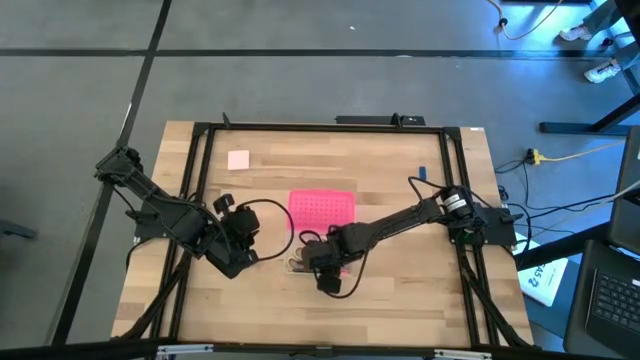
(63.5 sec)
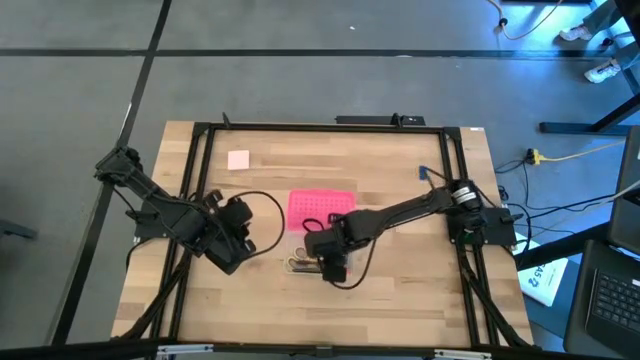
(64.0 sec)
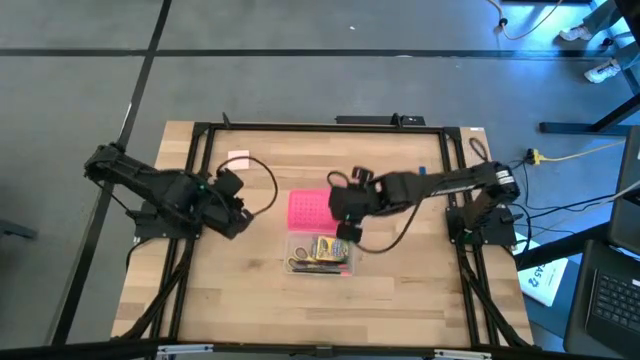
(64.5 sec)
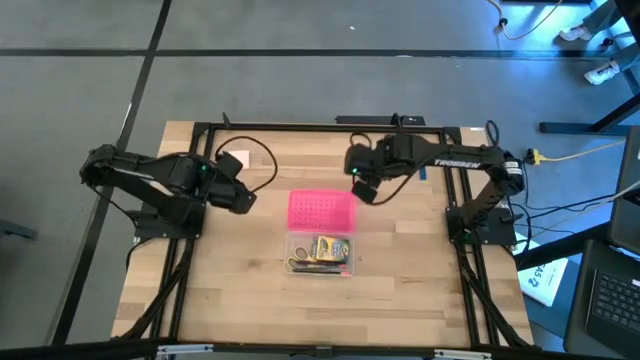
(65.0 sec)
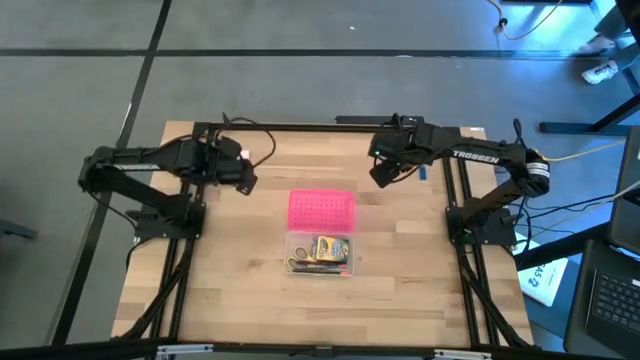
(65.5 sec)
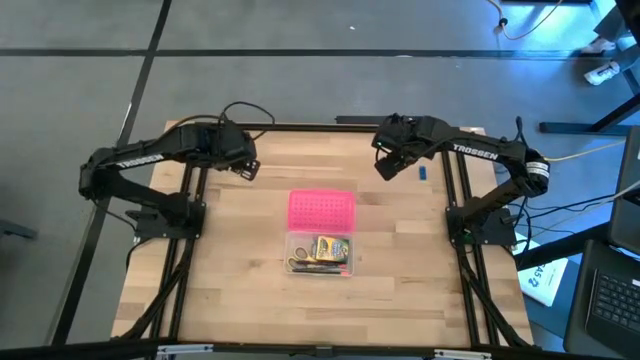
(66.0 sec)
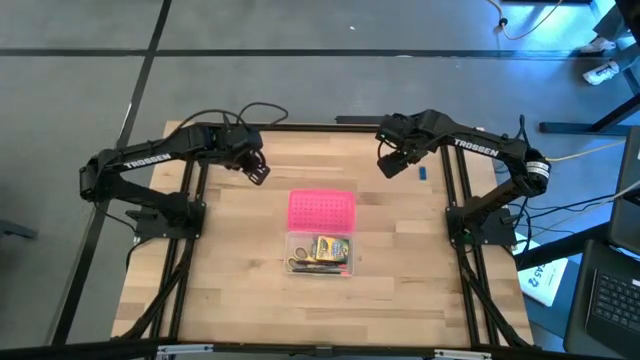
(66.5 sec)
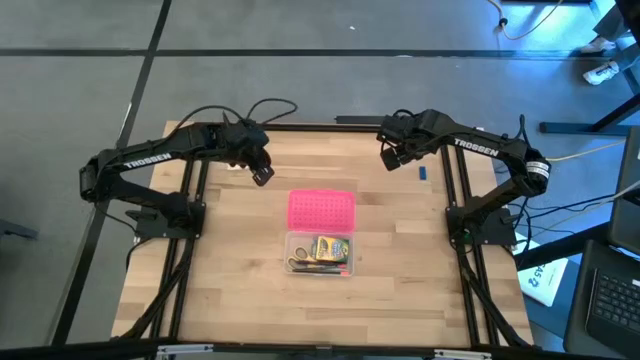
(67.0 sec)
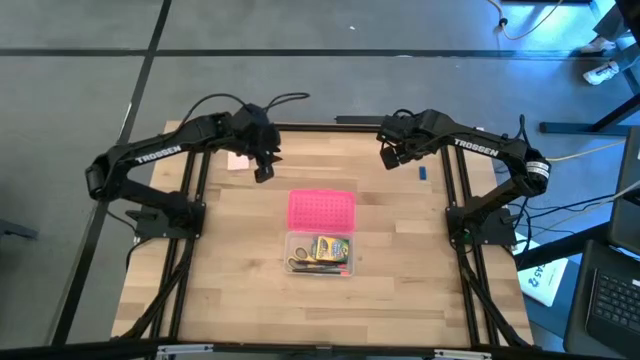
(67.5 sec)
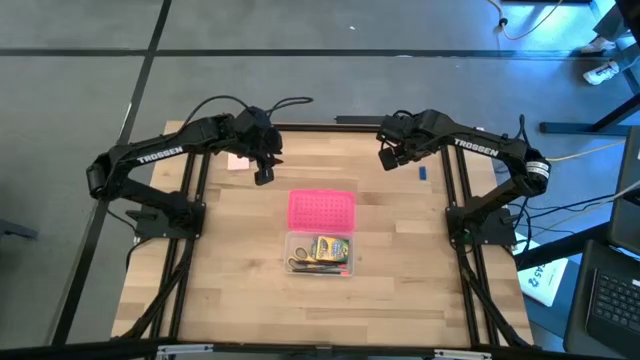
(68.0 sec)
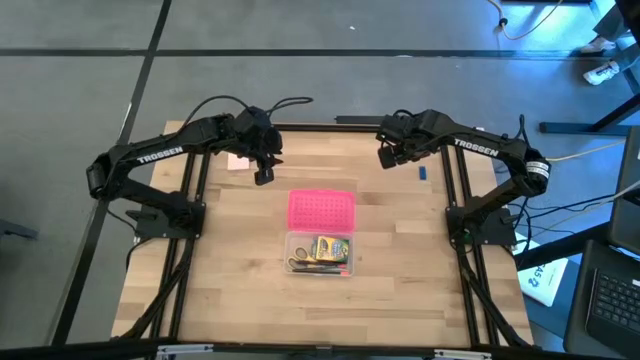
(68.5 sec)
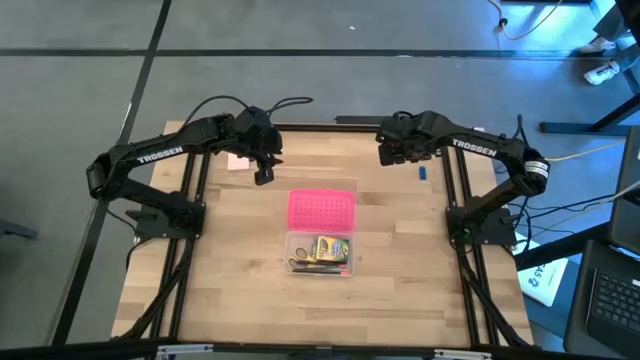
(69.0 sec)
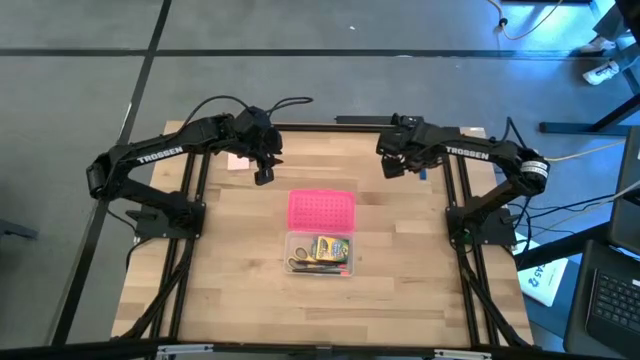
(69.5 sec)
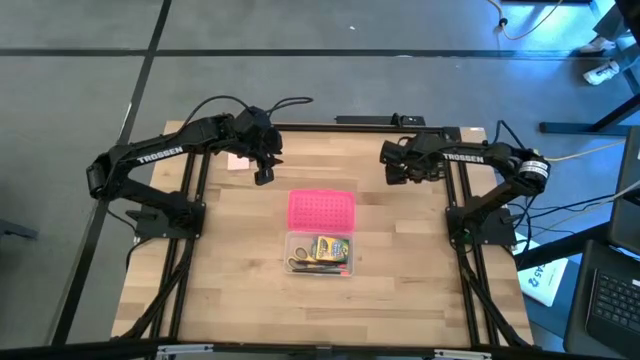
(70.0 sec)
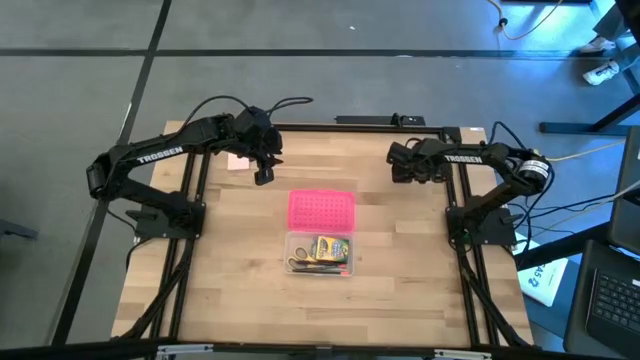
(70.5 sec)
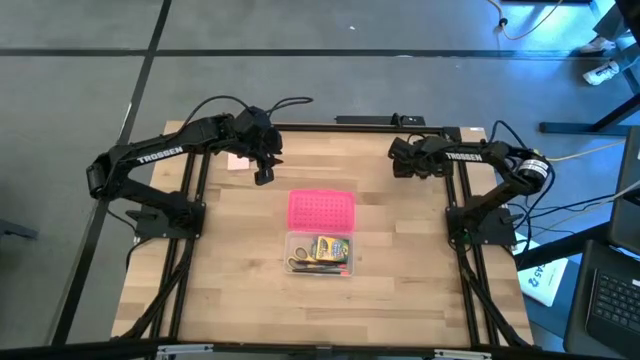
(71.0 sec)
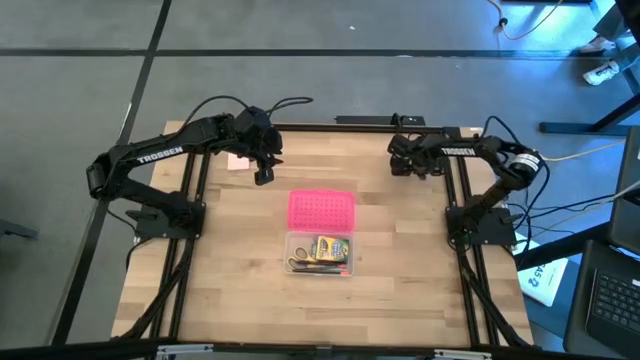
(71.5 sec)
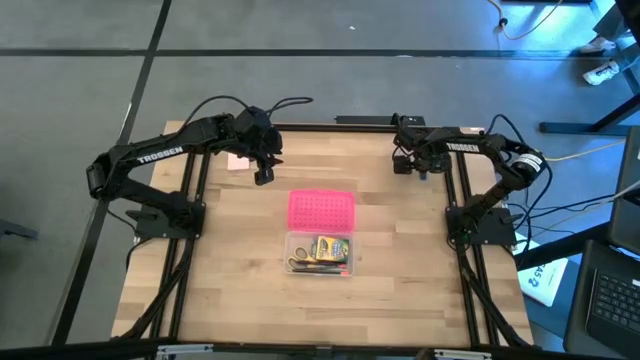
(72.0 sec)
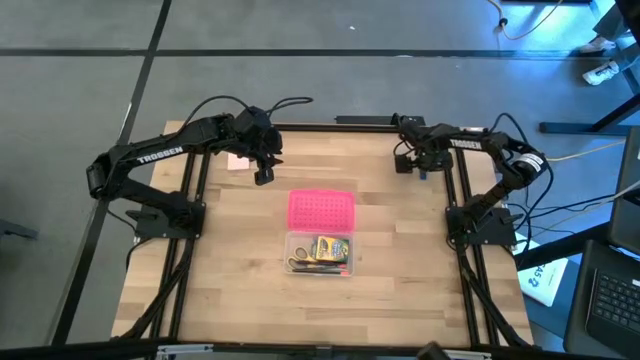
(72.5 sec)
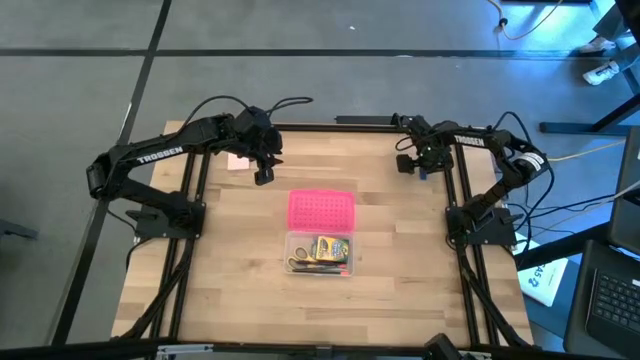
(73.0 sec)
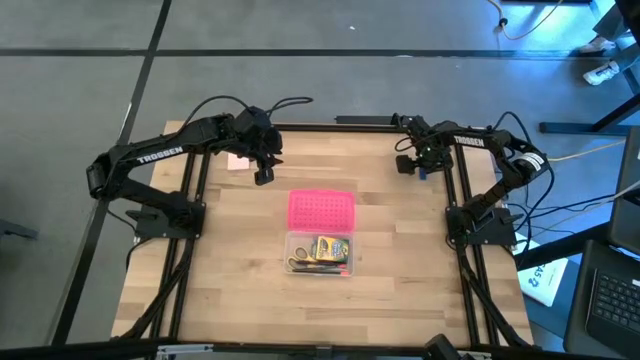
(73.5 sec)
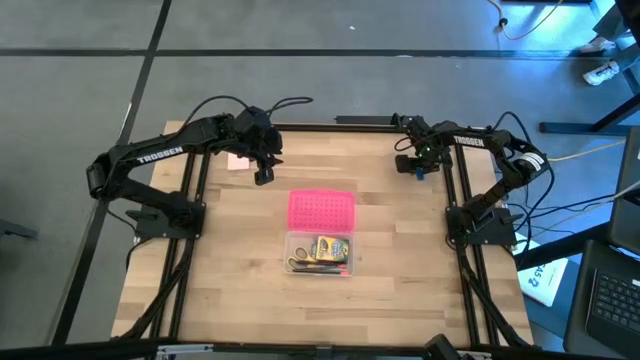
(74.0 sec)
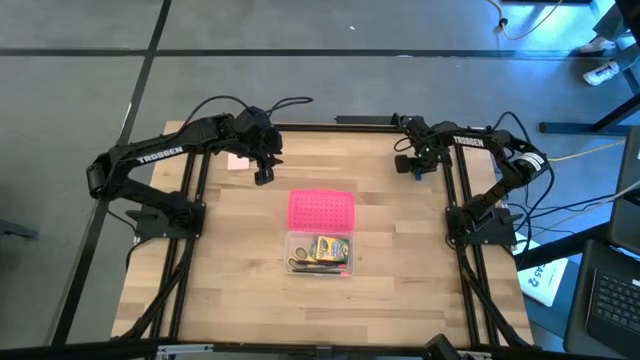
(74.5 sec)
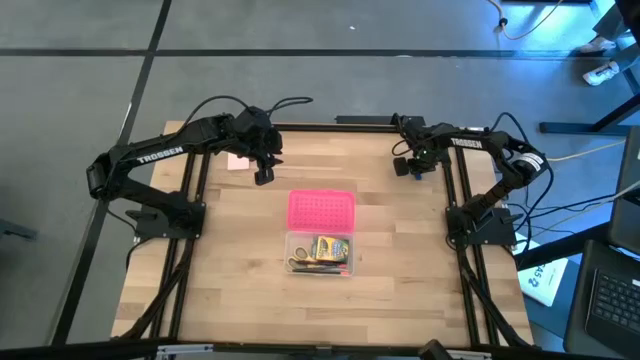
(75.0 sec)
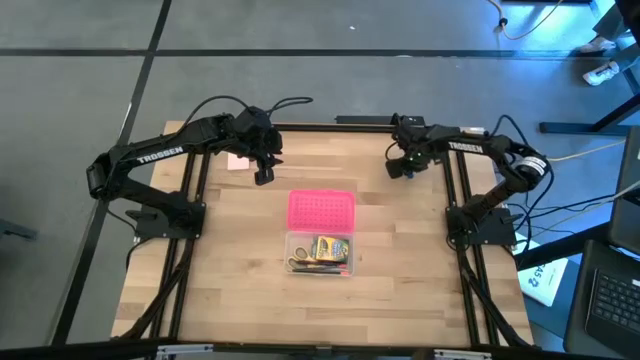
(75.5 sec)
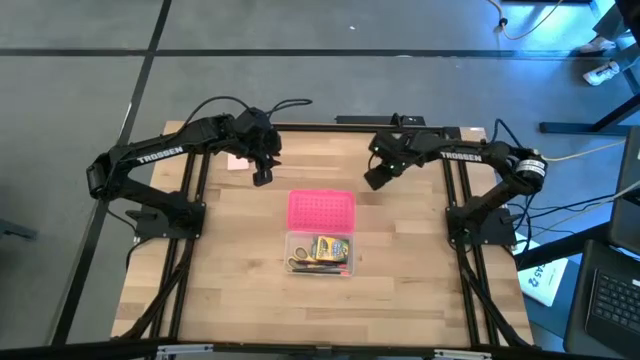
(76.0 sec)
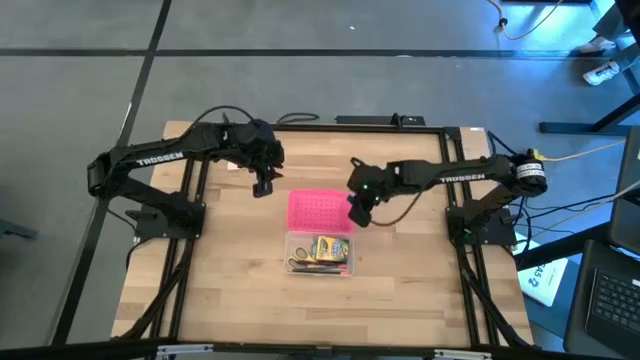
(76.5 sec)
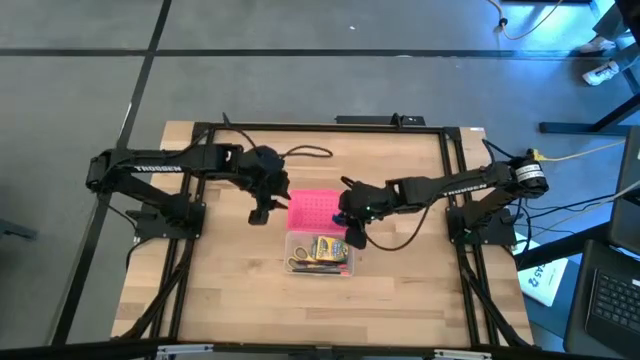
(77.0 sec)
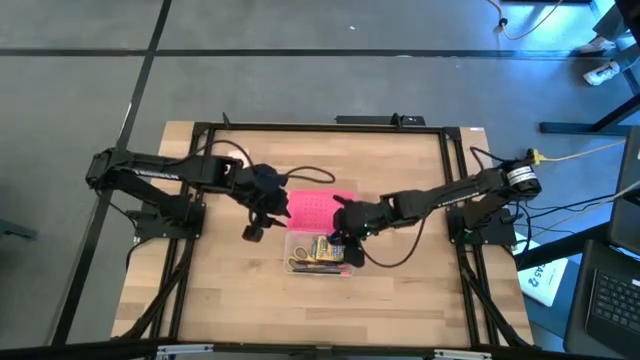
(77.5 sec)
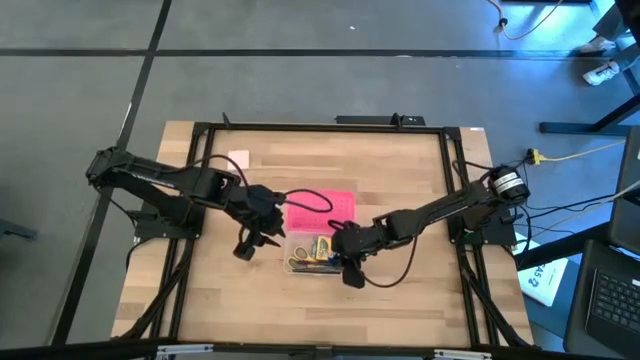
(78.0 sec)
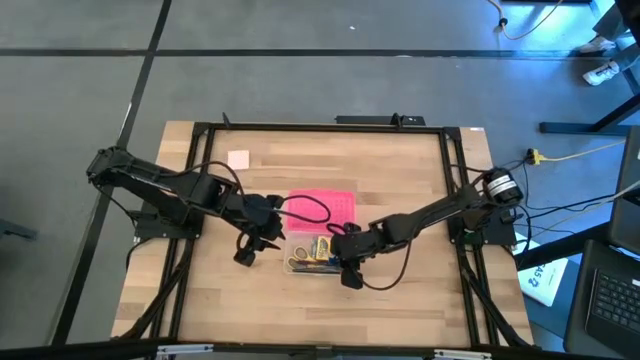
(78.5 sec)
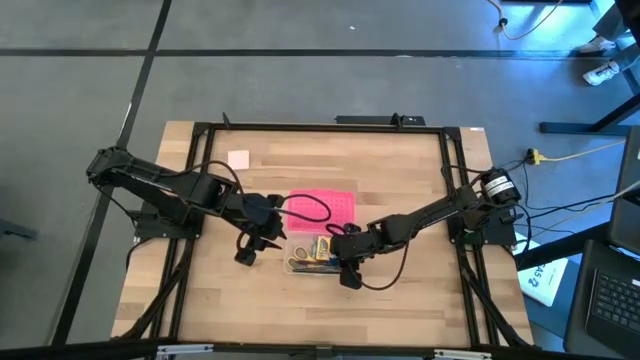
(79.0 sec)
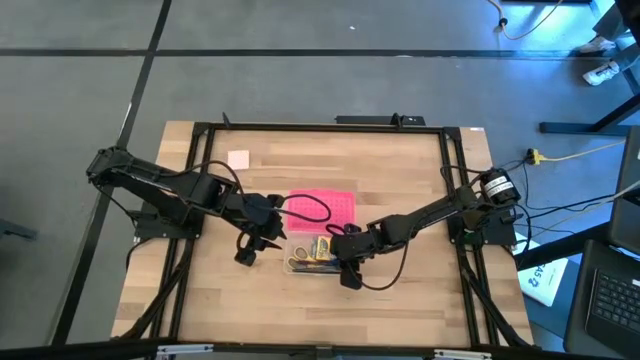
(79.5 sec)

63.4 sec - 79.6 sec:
Task: Pack school essentials
Put the blue eraser into the pink supply box

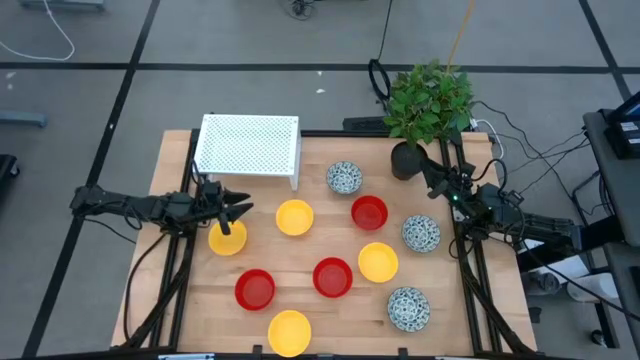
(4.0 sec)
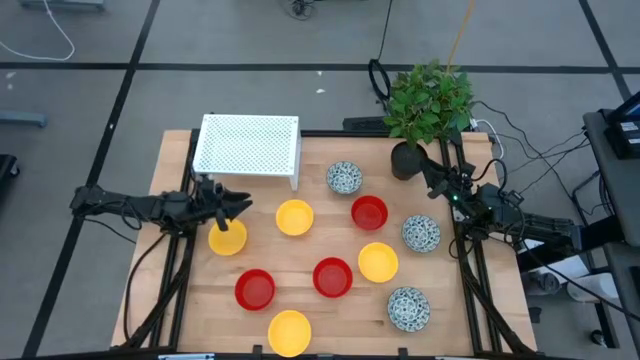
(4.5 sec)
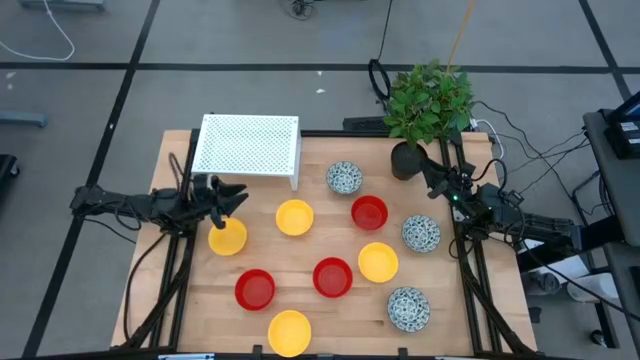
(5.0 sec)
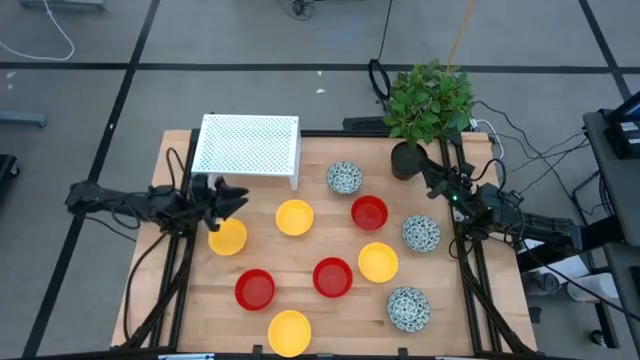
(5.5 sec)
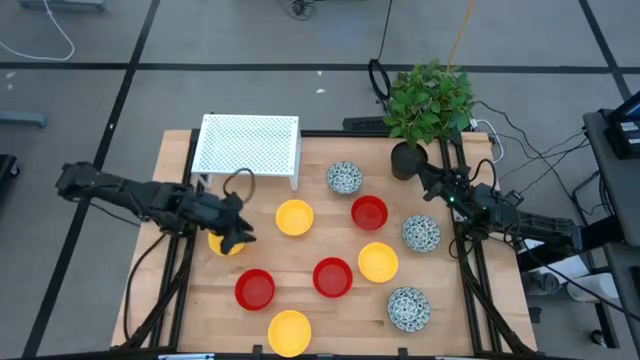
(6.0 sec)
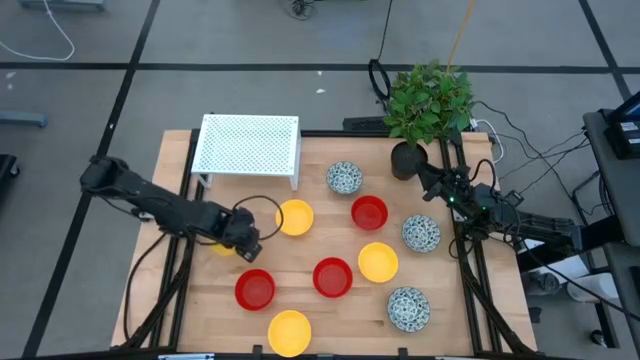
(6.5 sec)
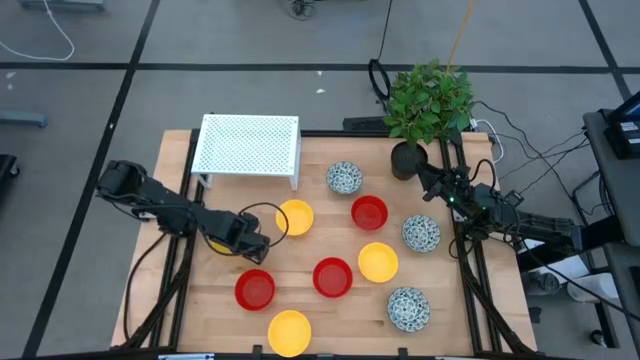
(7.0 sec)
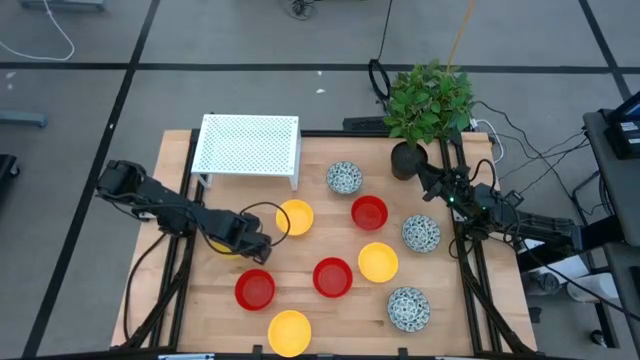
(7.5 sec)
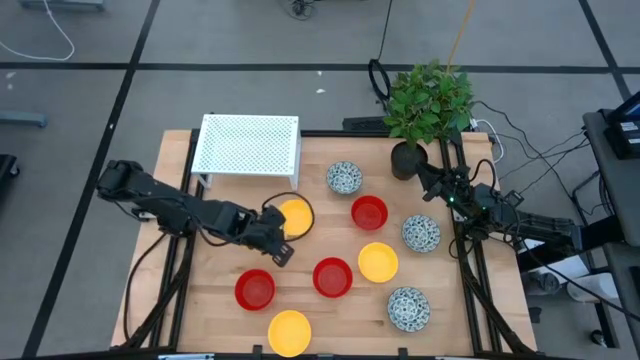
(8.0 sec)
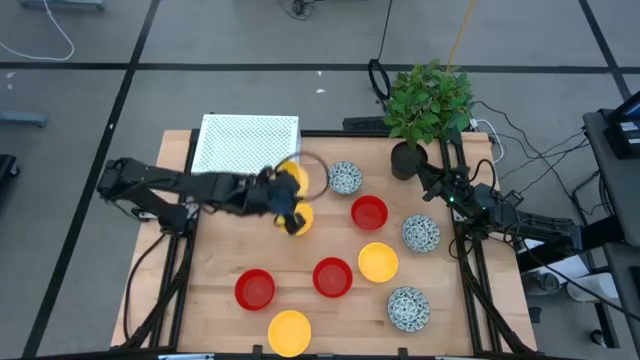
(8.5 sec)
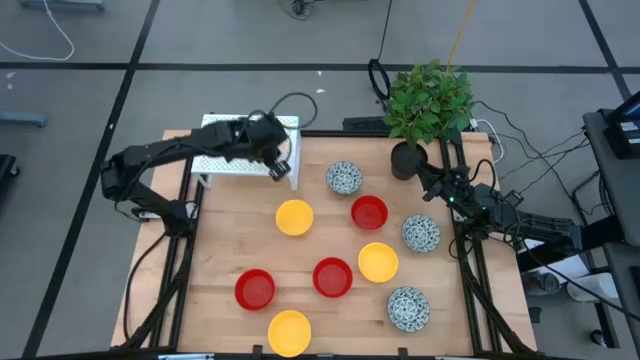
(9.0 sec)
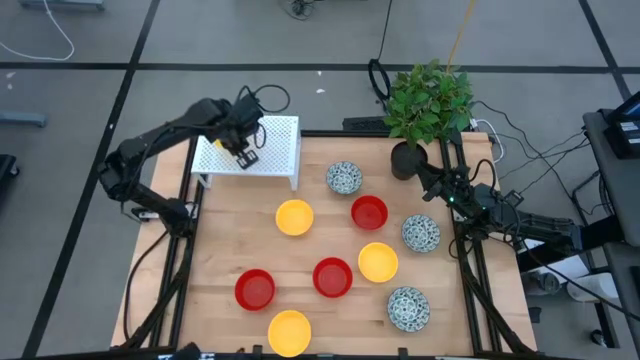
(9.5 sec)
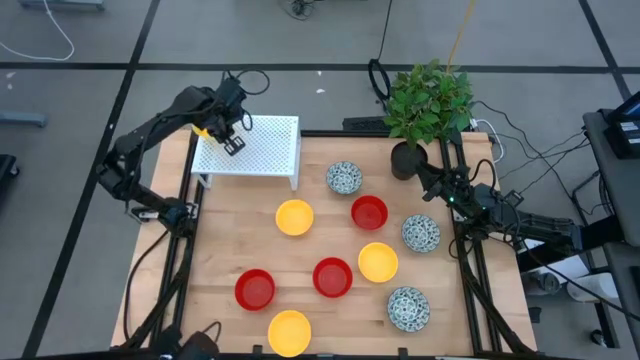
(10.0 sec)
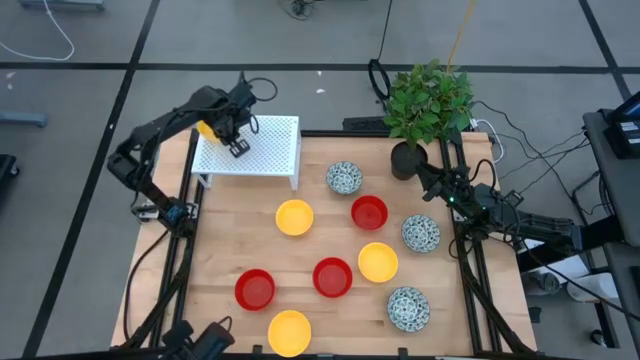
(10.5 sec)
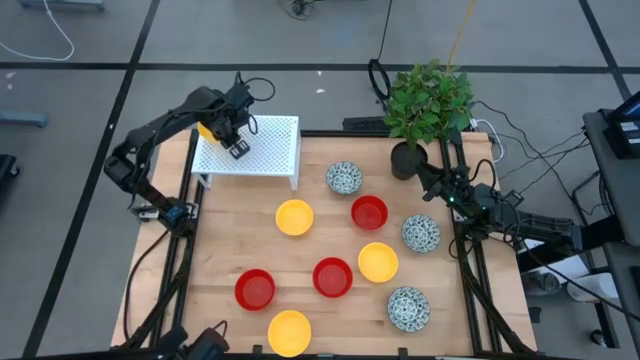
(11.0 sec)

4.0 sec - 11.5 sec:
Task: Pick & Place Mini bowls
Put the yellow bowl on the shelf
